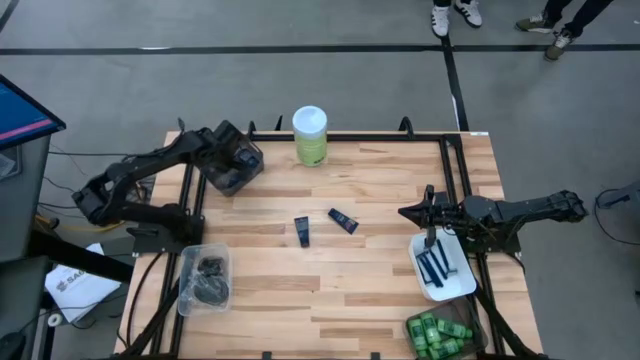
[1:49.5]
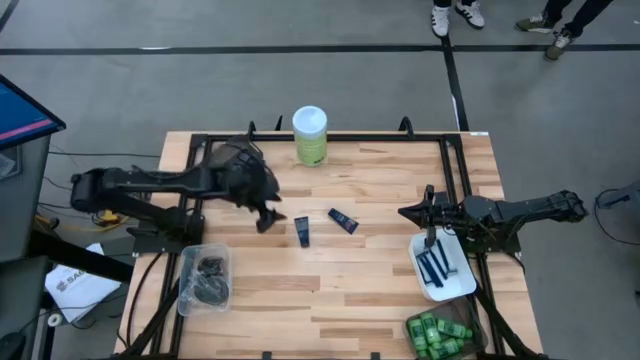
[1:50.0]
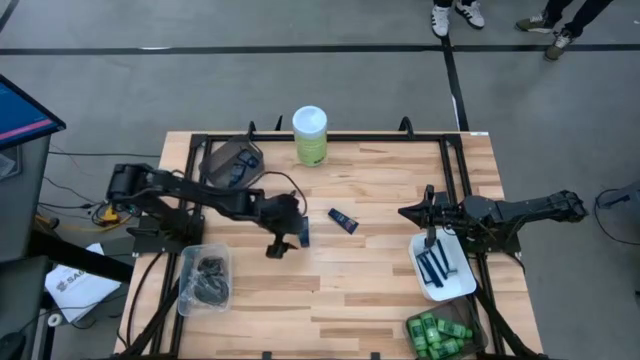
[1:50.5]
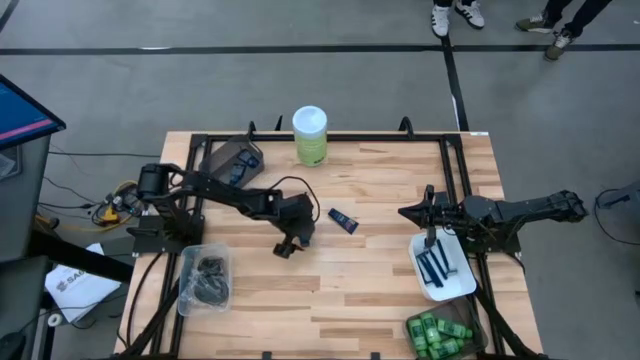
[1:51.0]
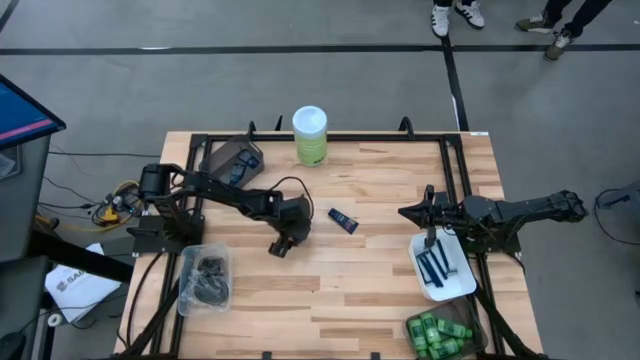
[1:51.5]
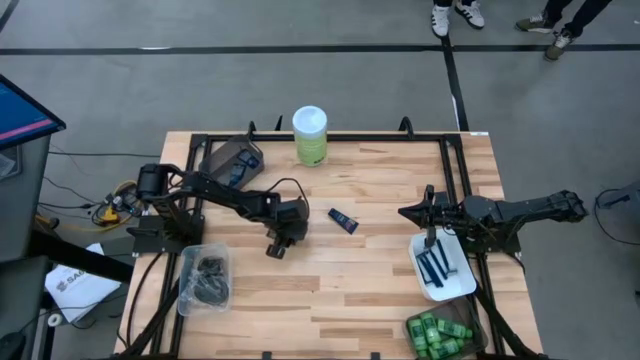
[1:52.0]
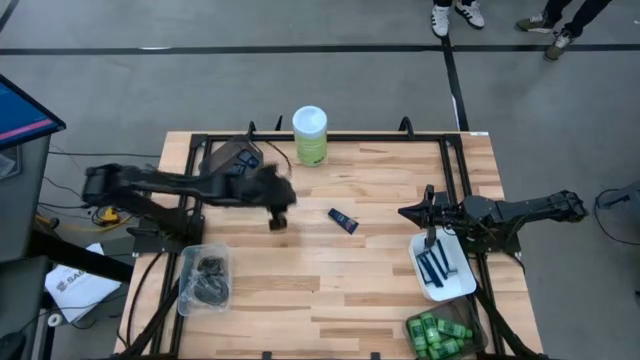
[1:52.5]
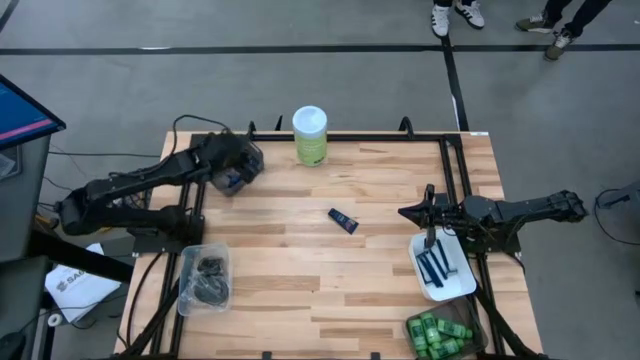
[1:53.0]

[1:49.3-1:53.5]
Task: Pick & Place Travel size toiletries
Put the black shave cream into the top black bin

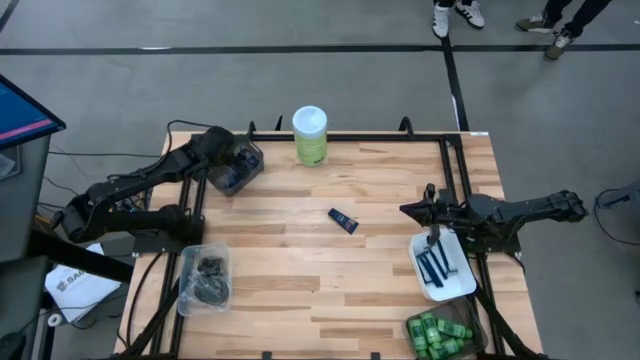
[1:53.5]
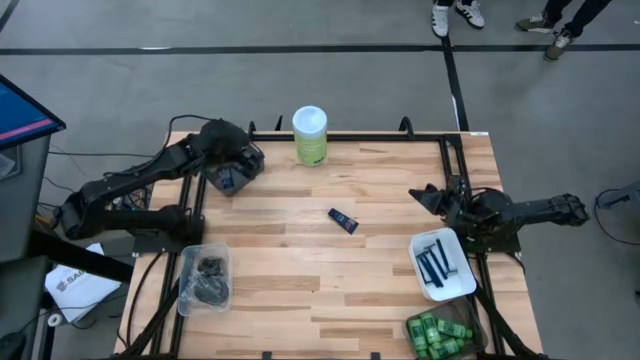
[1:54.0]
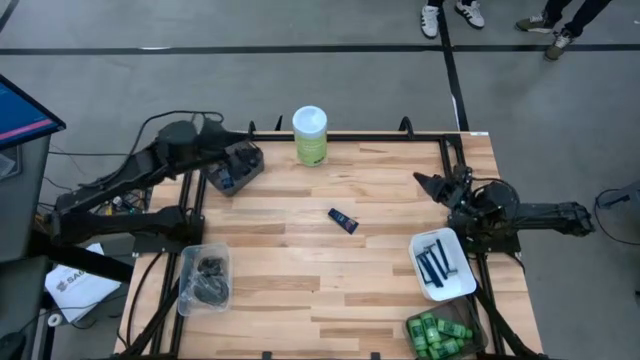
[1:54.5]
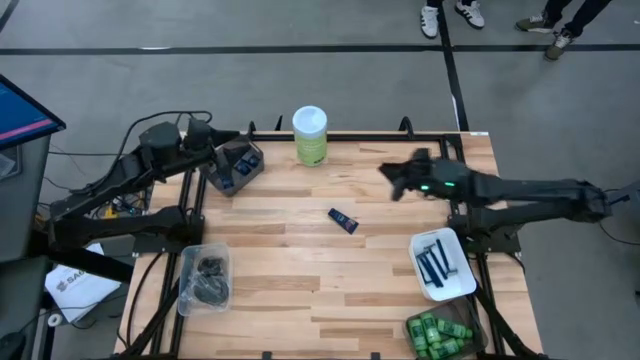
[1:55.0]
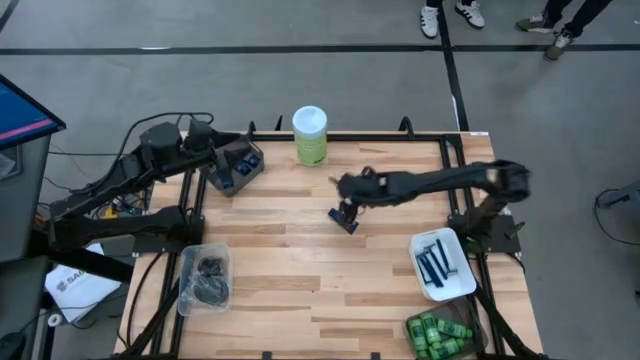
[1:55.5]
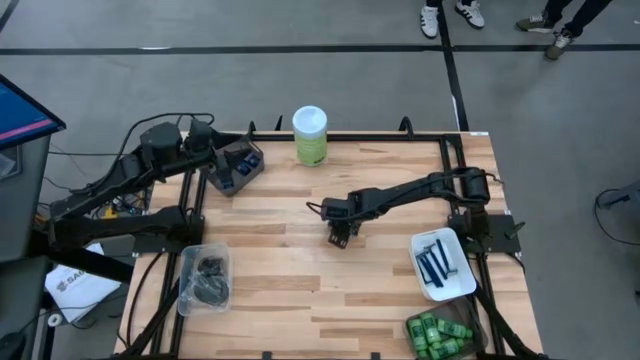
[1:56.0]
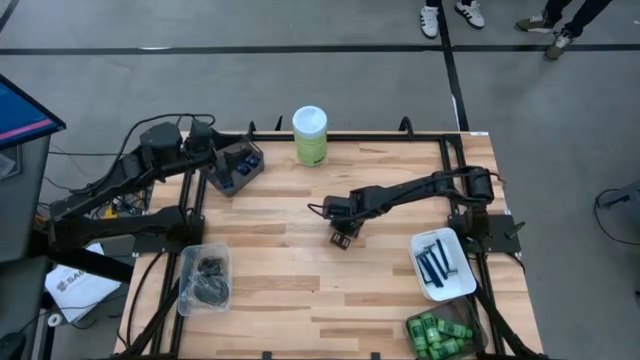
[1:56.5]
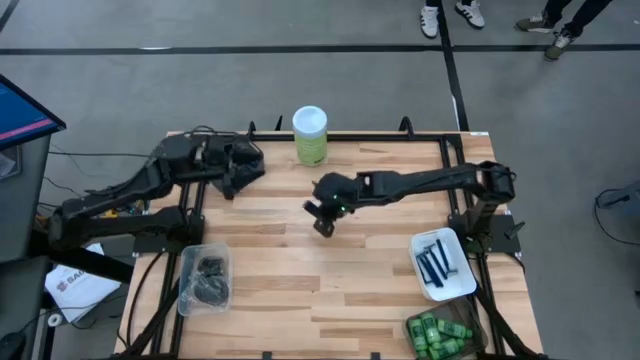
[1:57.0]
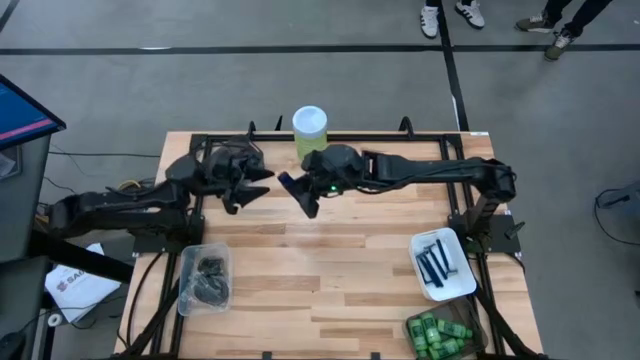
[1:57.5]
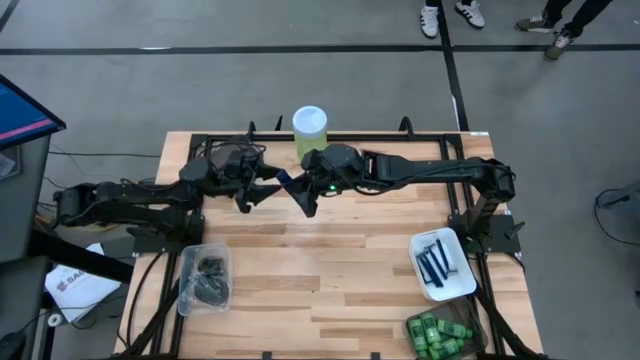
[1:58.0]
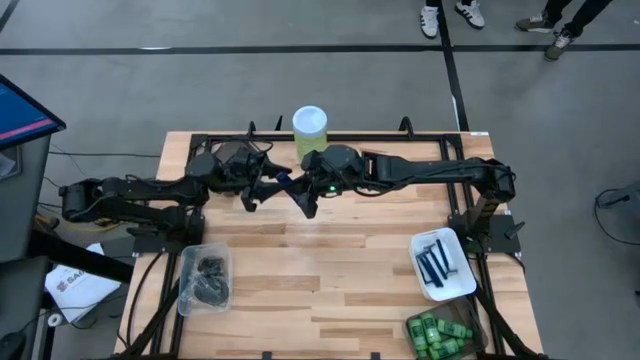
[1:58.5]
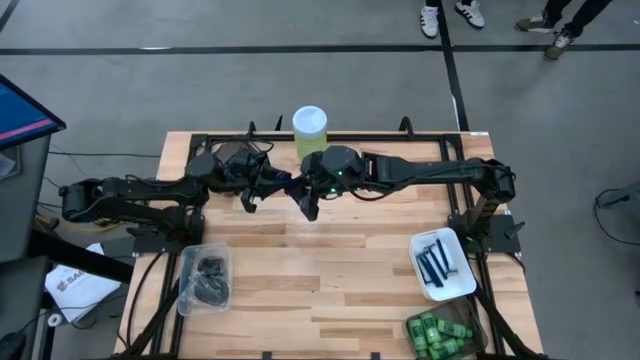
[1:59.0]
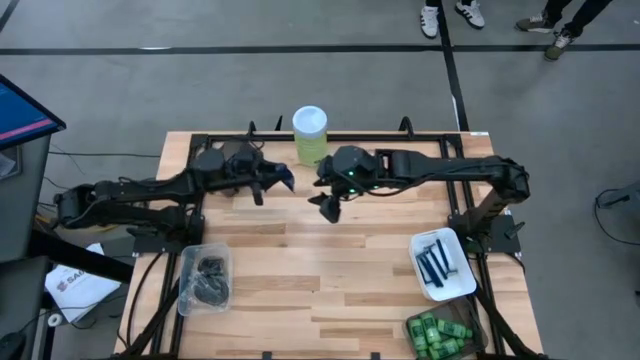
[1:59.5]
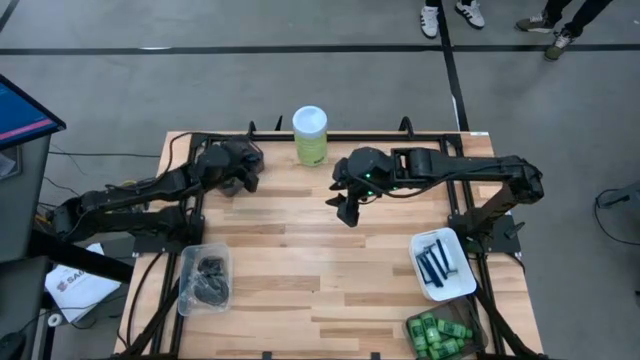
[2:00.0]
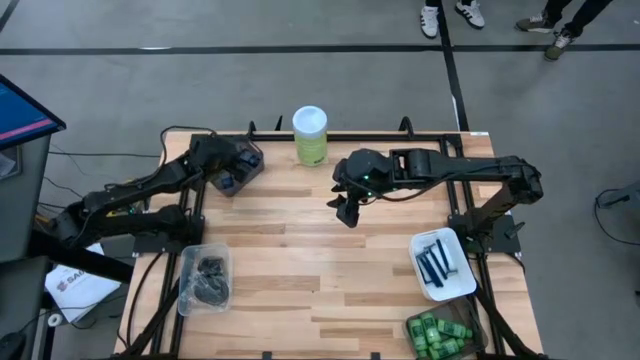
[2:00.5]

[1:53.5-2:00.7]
Put the black shave cream into the top black bin

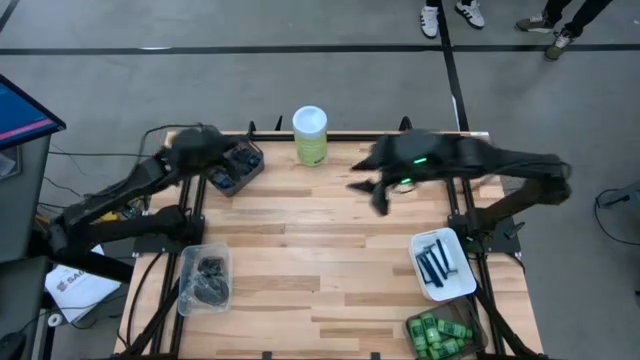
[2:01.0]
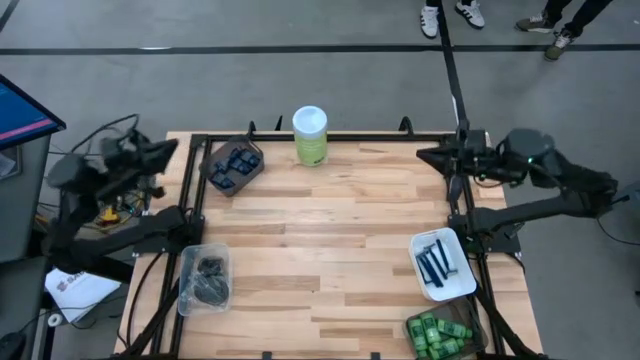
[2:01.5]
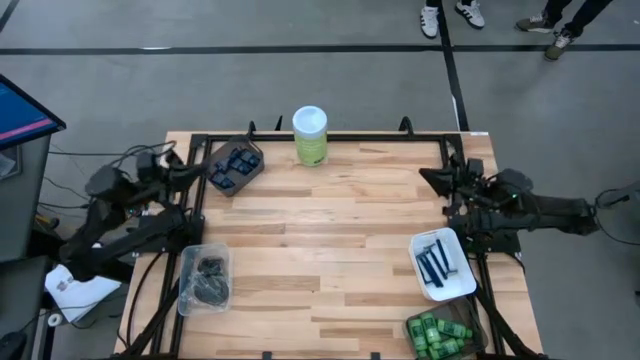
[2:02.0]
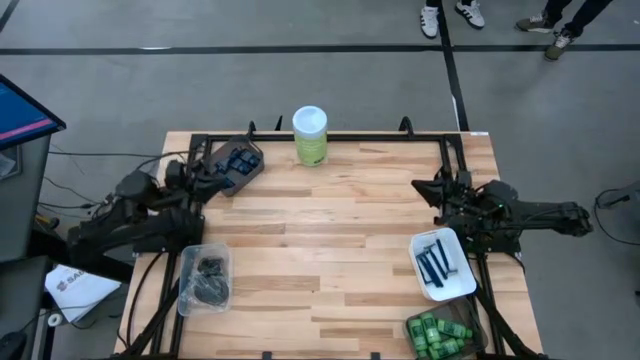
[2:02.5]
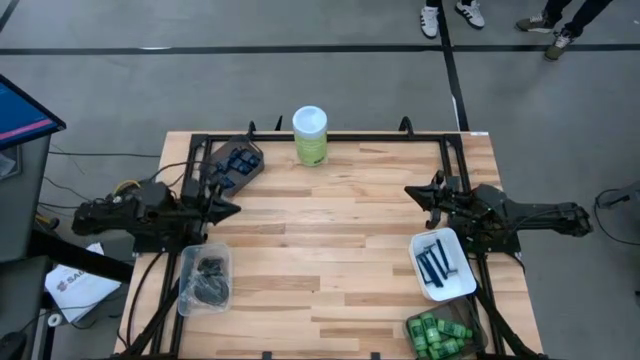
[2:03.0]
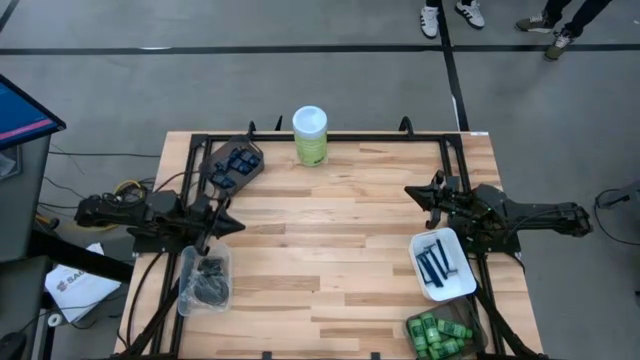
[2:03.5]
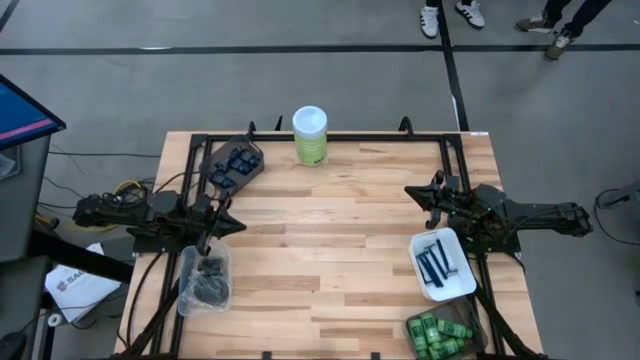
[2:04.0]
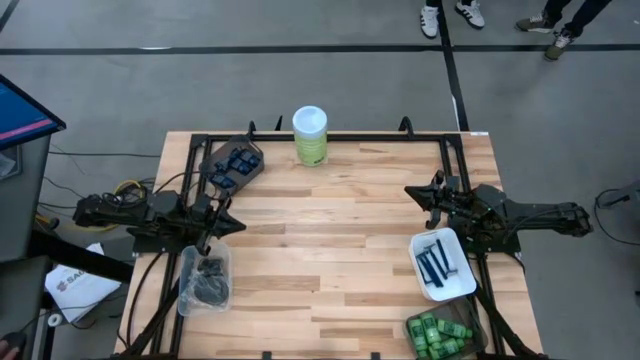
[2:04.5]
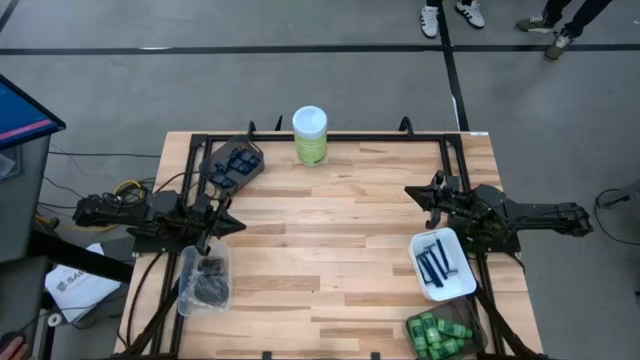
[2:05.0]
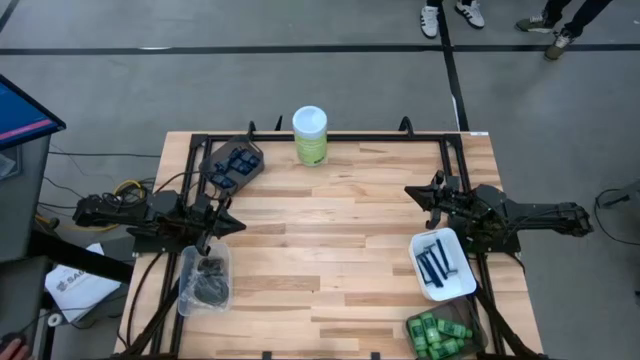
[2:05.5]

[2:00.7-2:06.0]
Return to Home Position

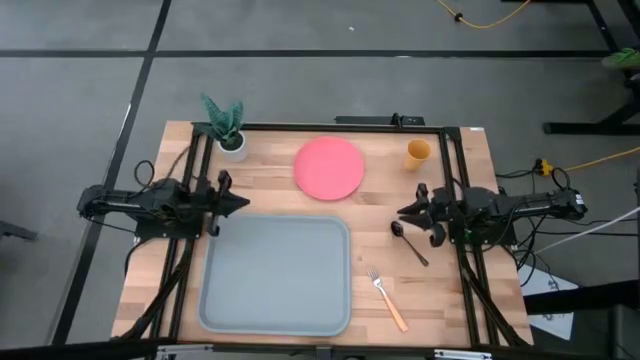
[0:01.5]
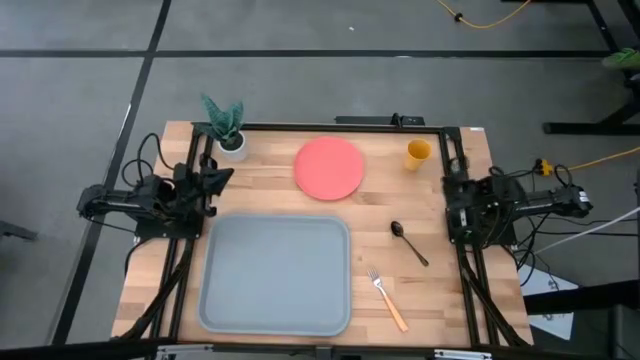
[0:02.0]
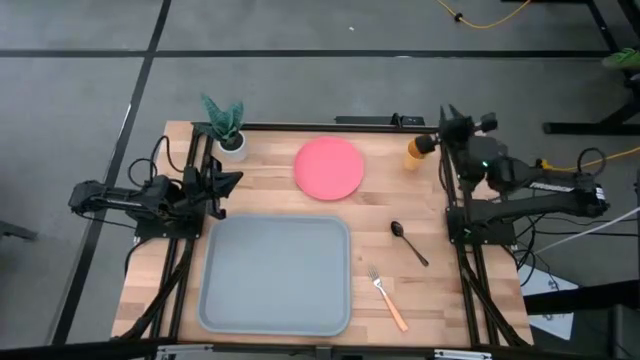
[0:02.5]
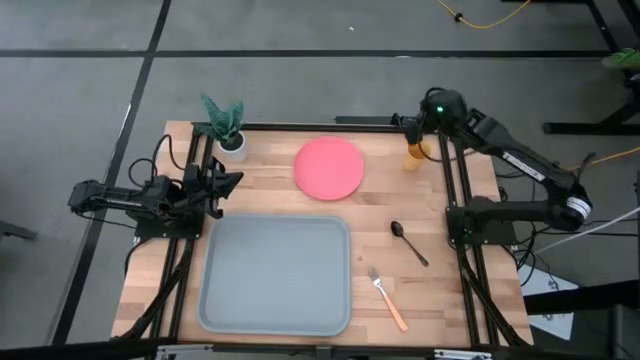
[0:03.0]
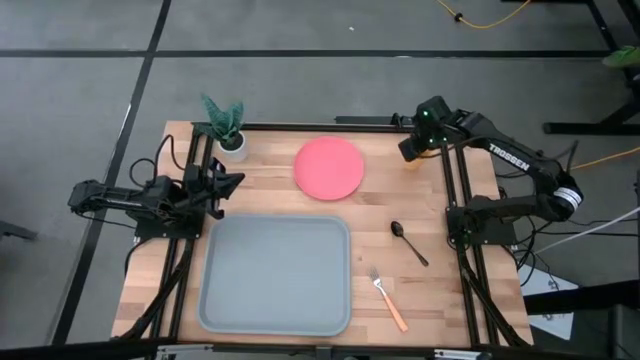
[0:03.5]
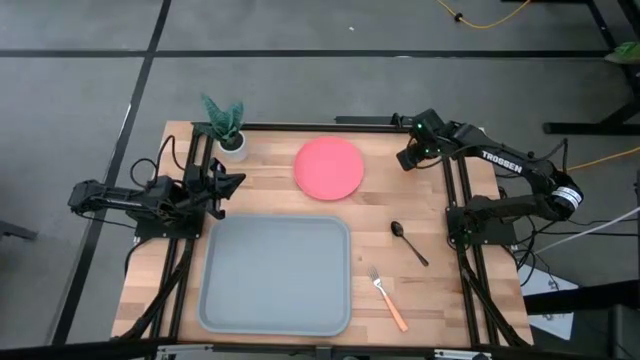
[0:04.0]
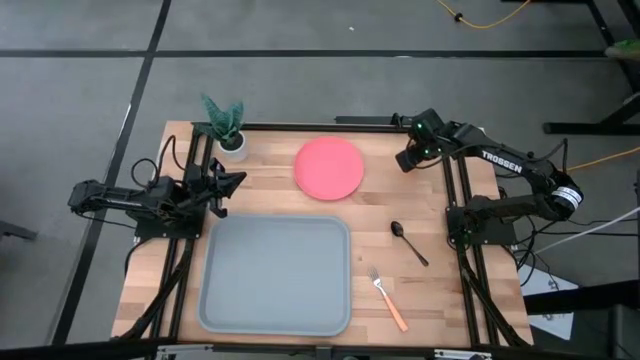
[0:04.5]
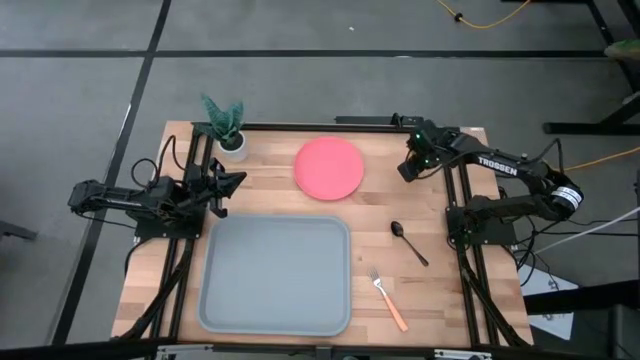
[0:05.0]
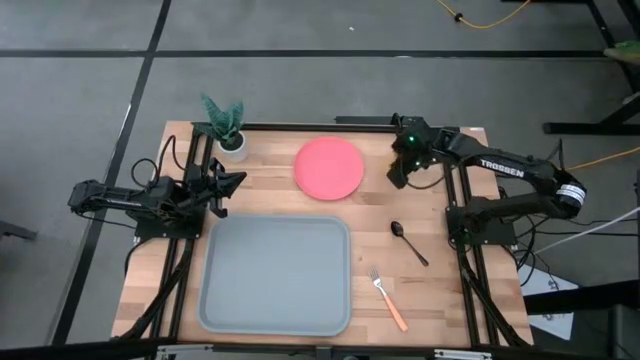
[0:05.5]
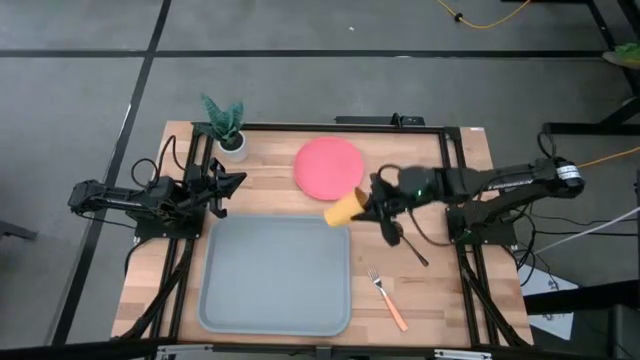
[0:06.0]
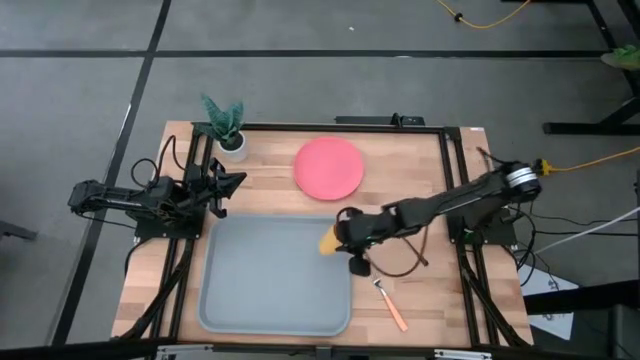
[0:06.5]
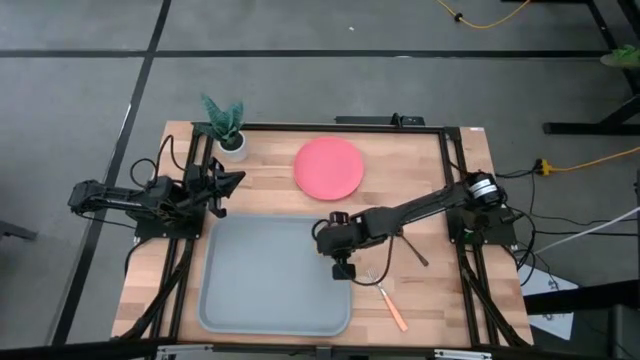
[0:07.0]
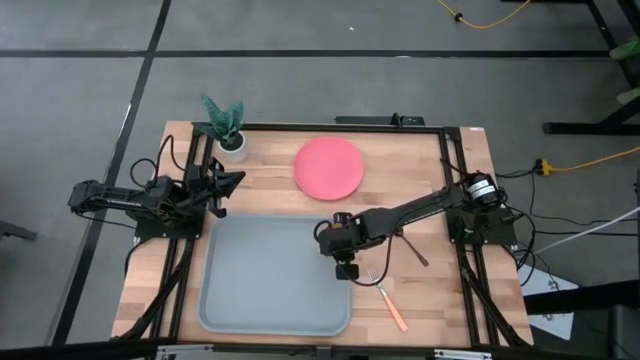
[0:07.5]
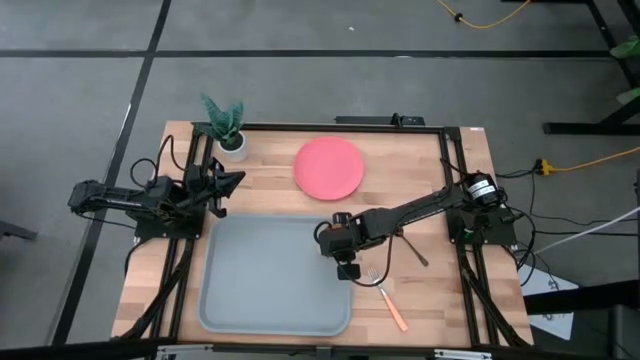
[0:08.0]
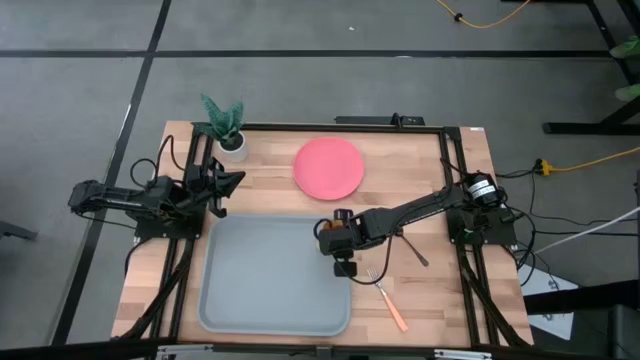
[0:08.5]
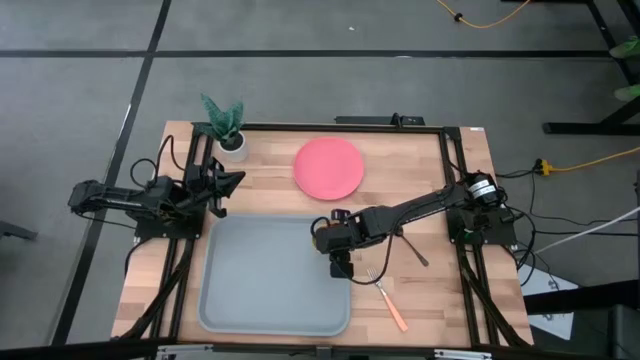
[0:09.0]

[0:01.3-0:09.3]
Task: Pick and place plate/cup/fork/spoon on tray
Put the yellow cup on the gray tray
